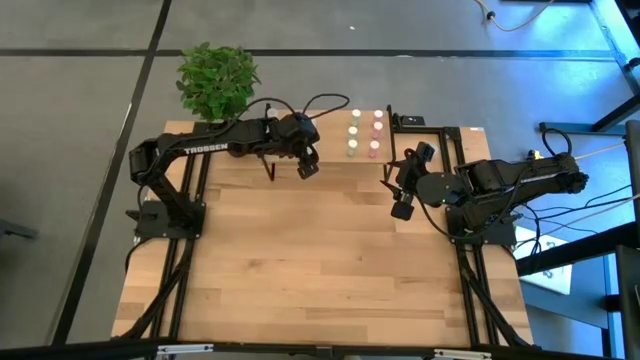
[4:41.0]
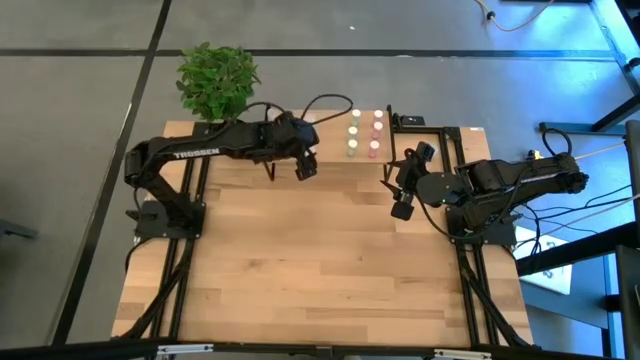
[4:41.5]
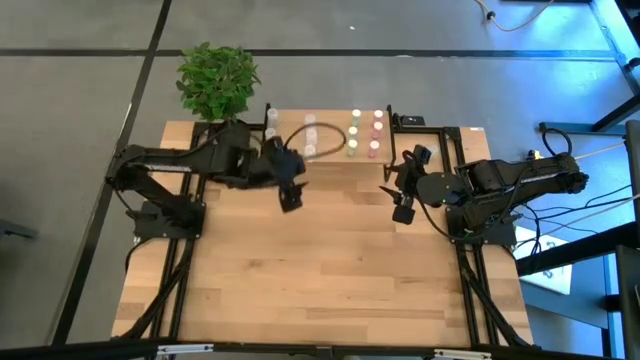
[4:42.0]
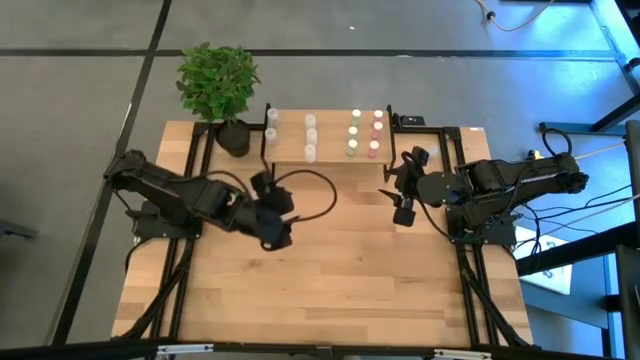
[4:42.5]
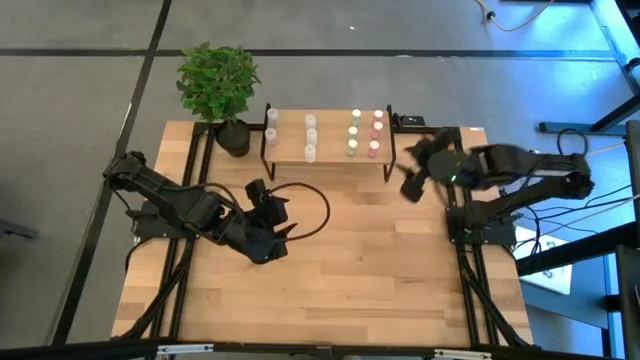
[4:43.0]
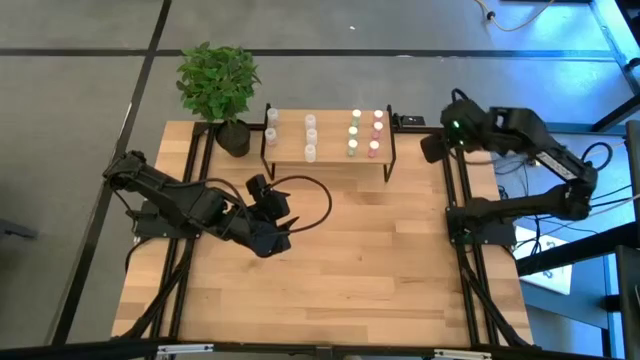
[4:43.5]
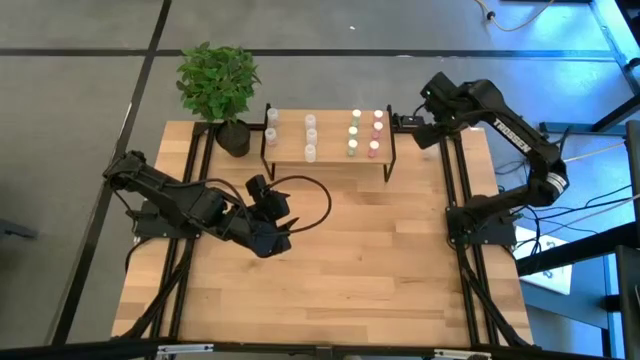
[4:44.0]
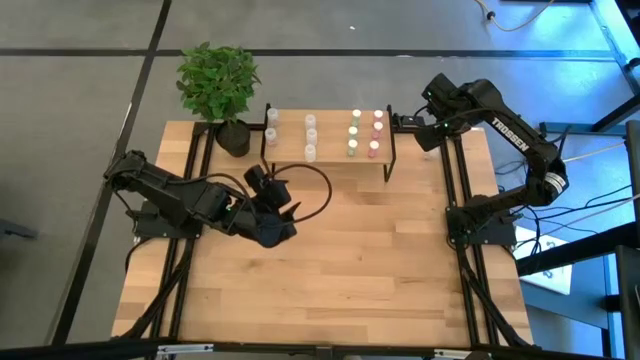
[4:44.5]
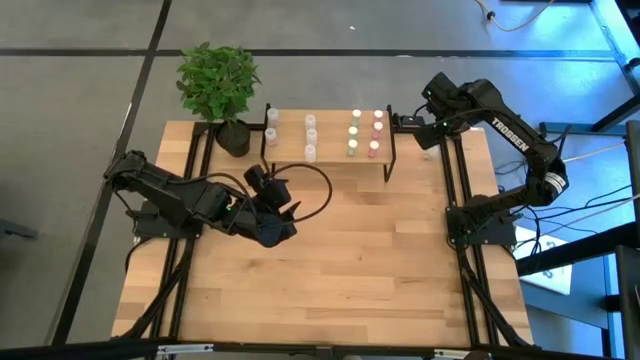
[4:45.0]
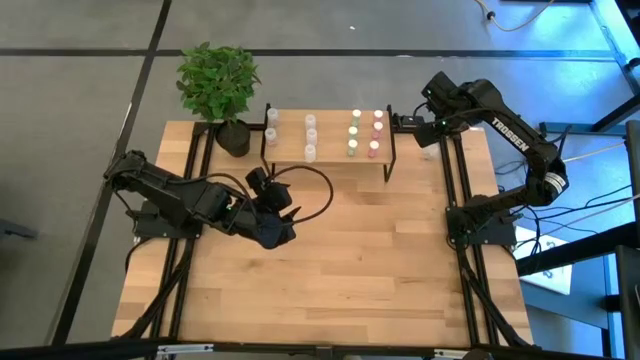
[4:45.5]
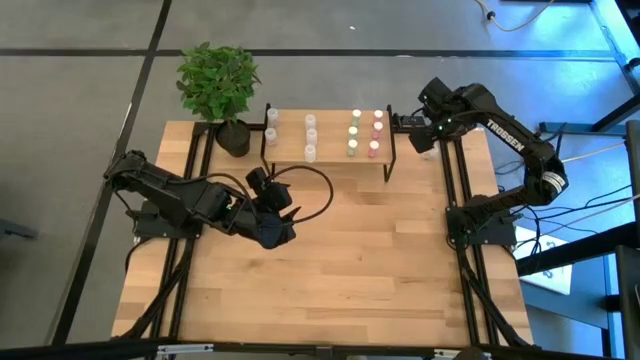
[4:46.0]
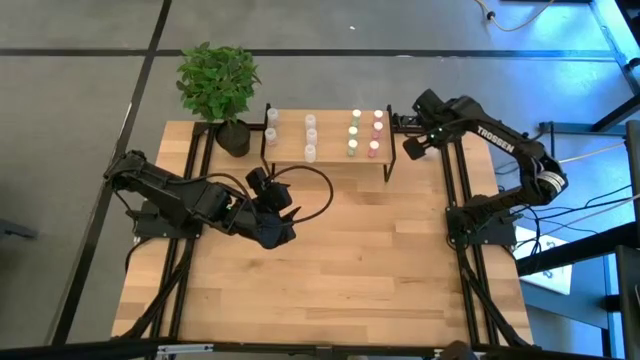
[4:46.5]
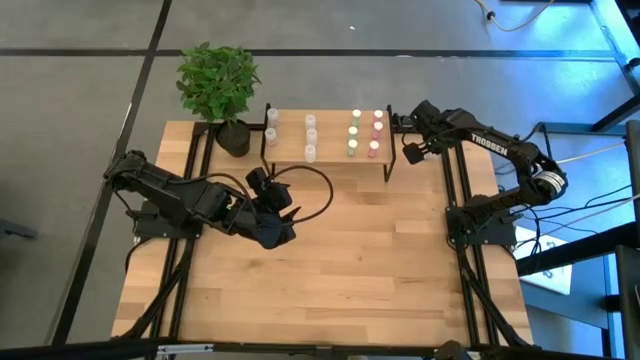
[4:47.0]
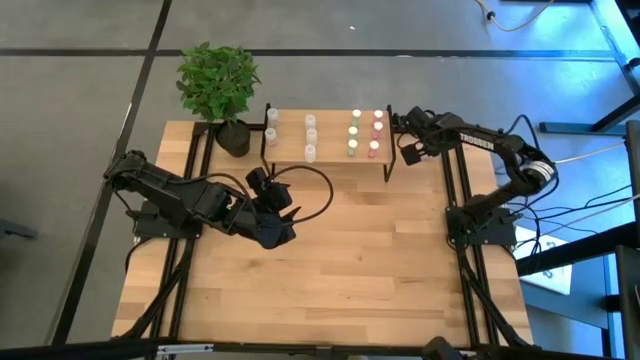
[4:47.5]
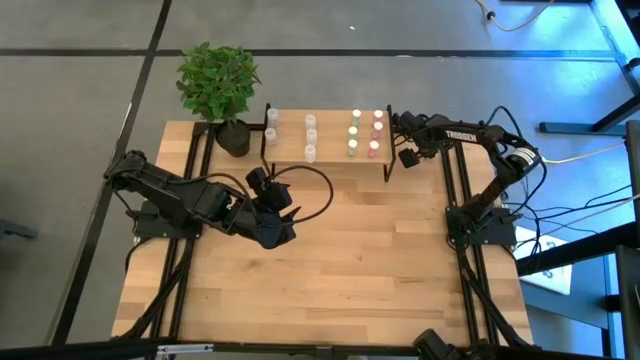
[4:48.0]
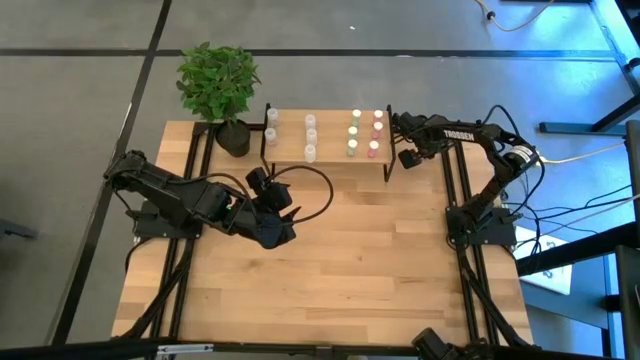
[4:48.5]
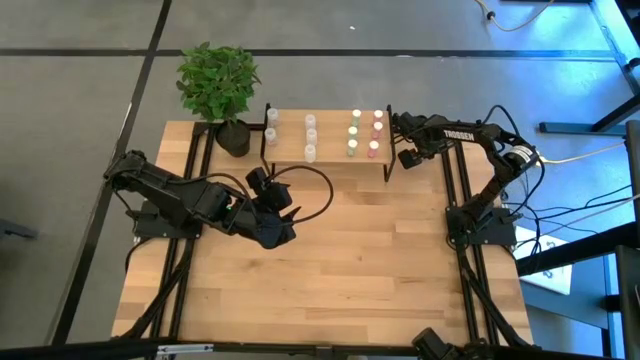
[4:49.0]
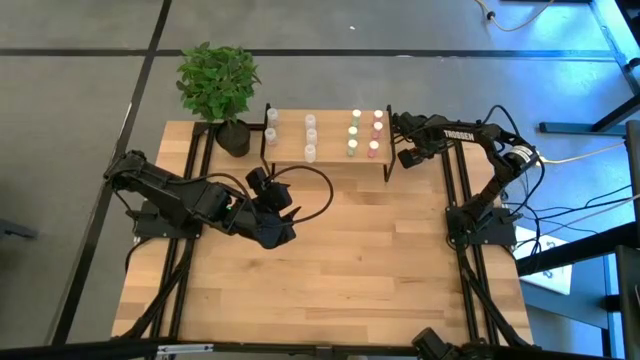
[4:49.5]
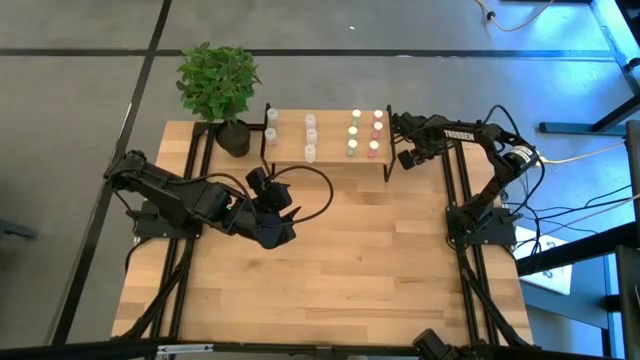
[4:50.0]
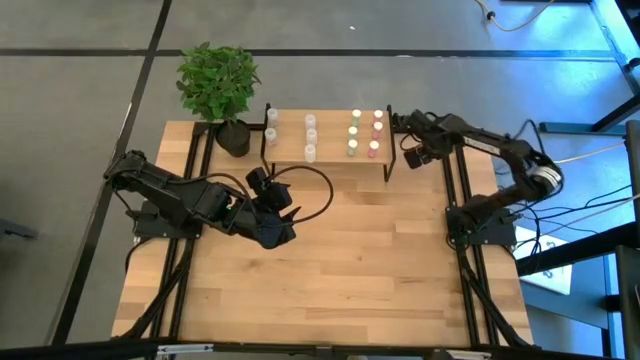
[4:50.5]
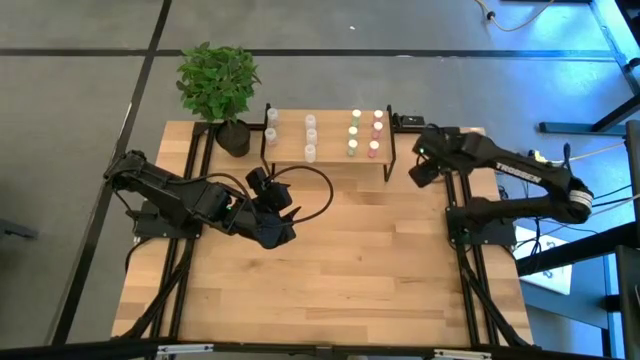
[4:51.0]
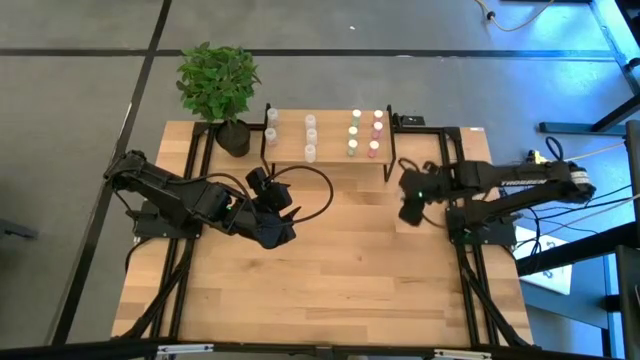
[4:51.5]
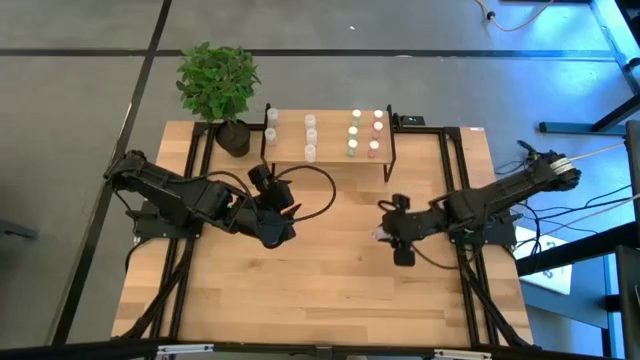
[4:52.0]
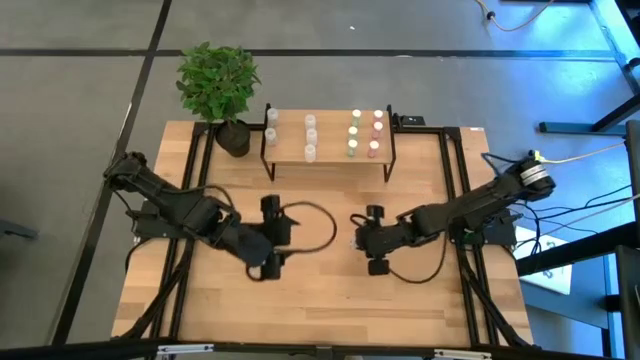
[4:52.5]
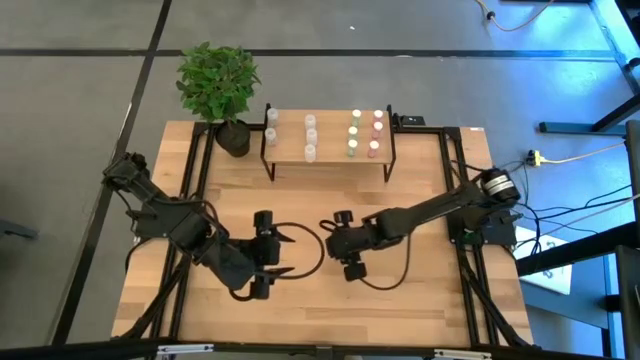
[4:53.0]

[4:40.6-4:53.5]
Task: Pick and place medicine bottles onto shelf by color
Put the transparent pill bottle on the shelf aligned with the other transparent pill bottles

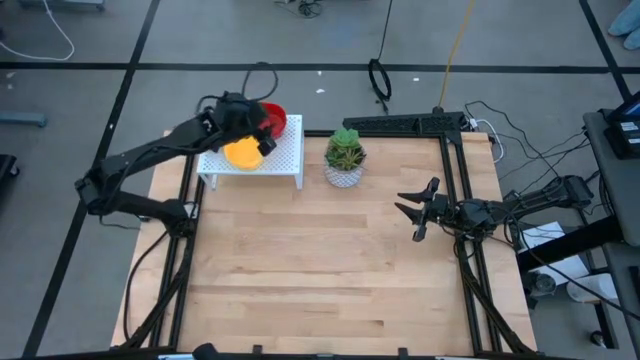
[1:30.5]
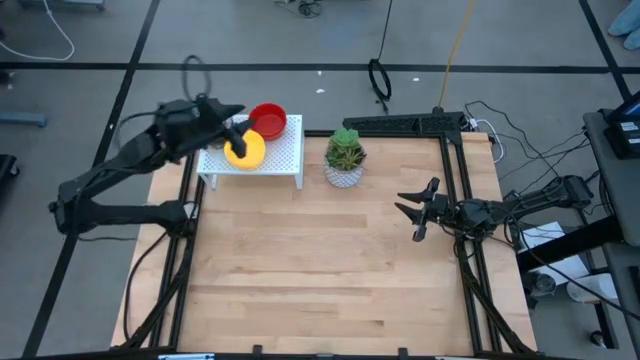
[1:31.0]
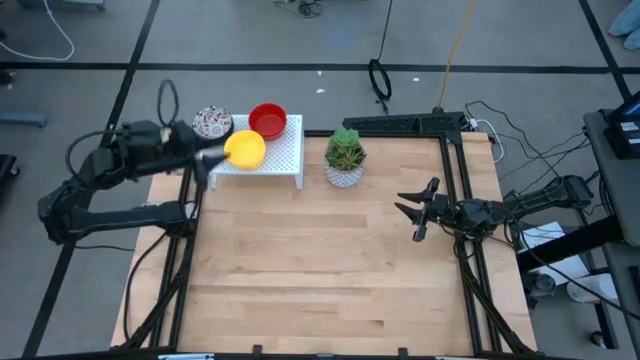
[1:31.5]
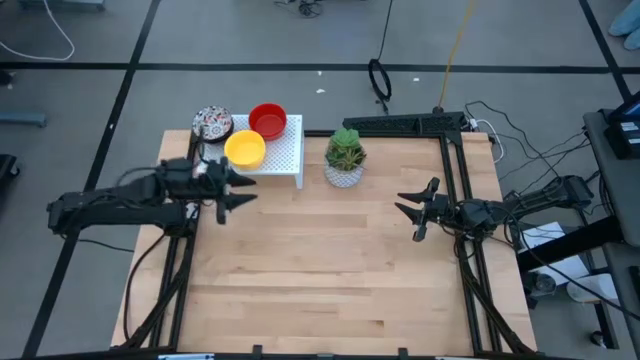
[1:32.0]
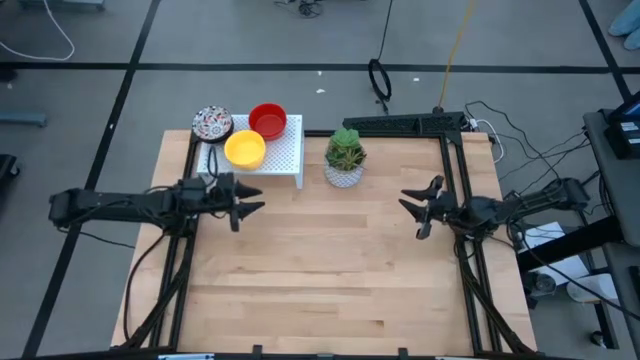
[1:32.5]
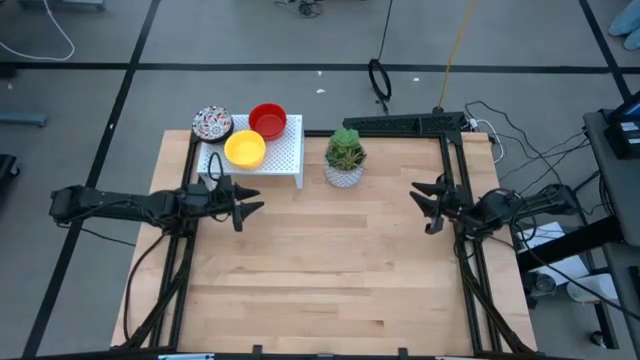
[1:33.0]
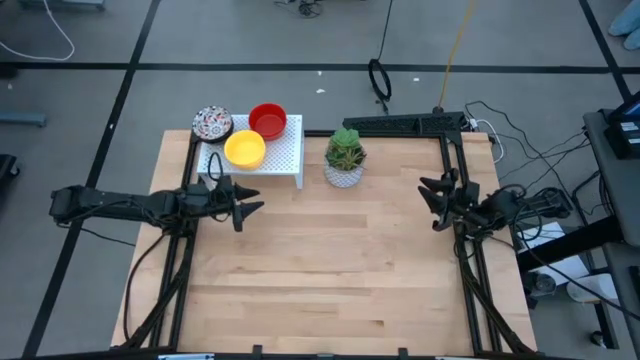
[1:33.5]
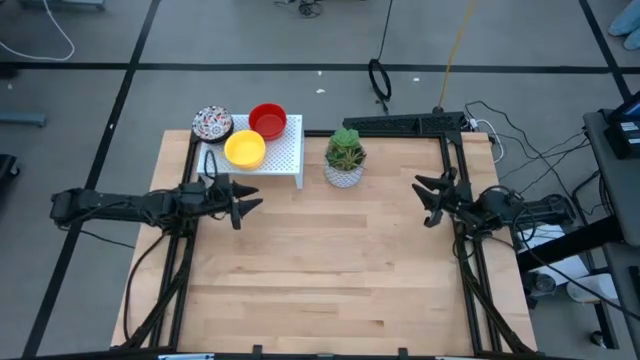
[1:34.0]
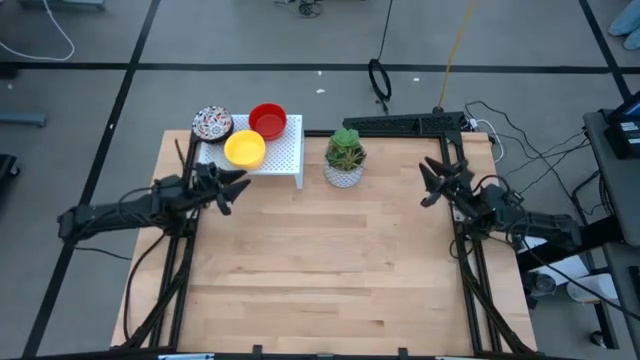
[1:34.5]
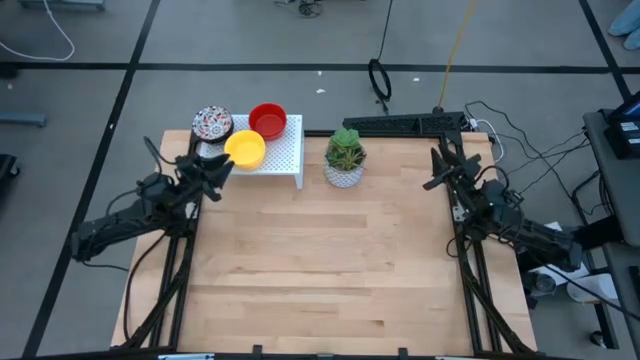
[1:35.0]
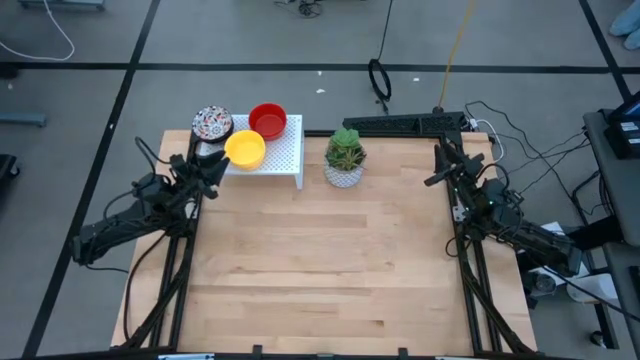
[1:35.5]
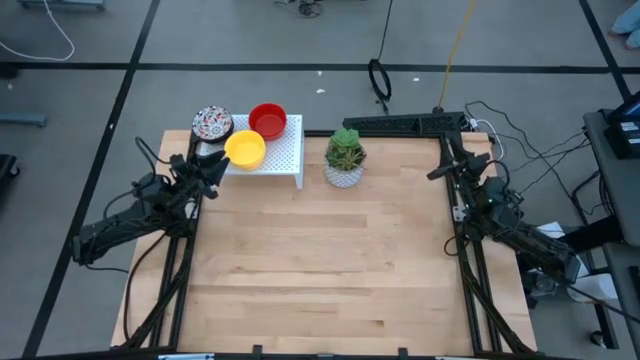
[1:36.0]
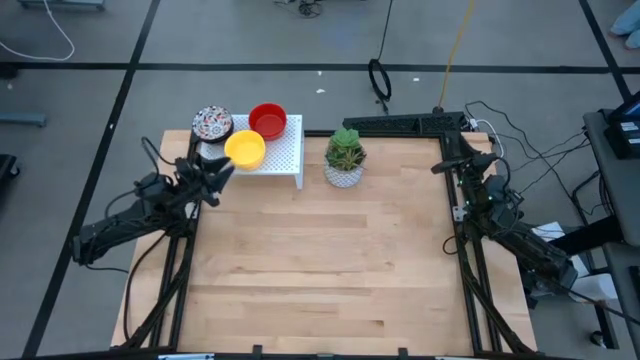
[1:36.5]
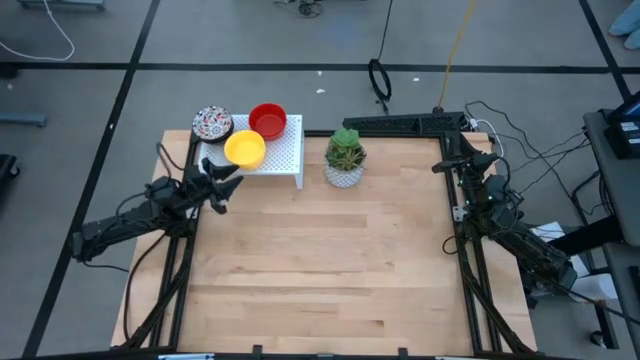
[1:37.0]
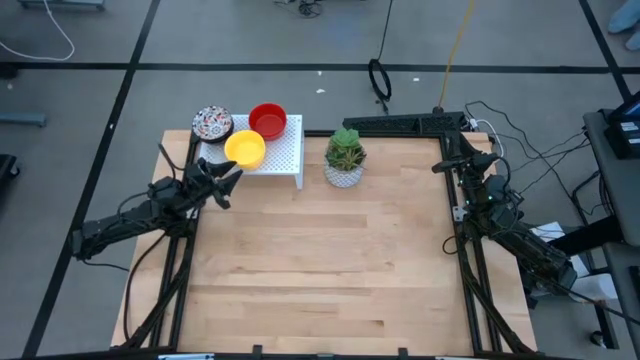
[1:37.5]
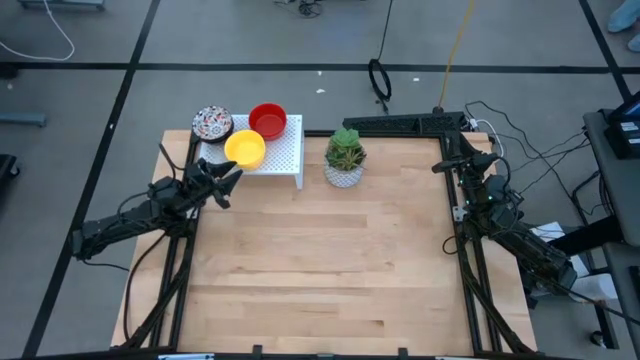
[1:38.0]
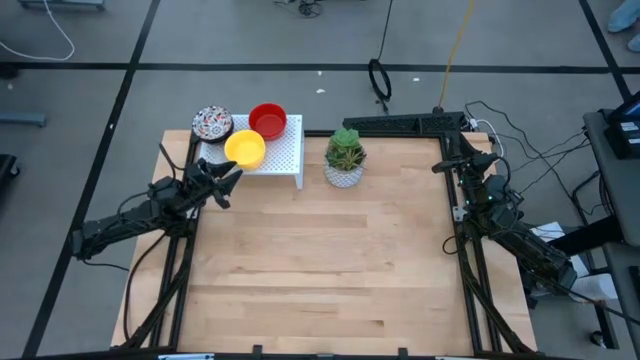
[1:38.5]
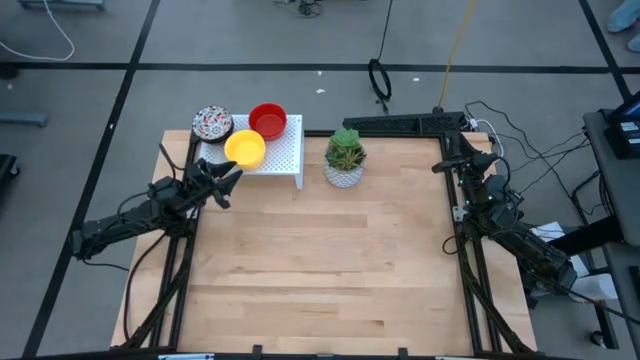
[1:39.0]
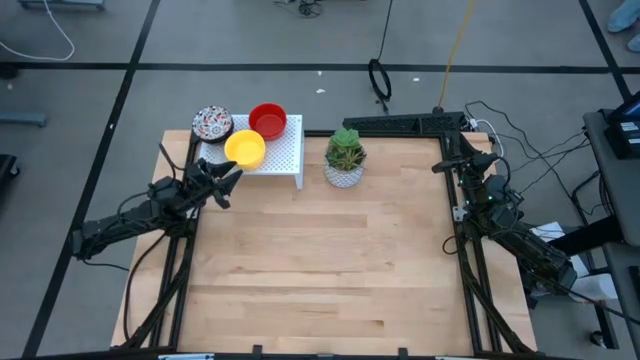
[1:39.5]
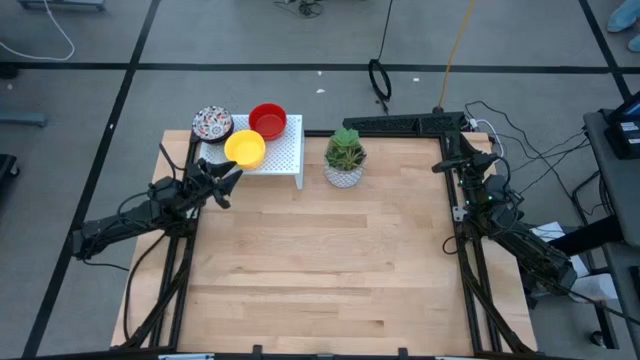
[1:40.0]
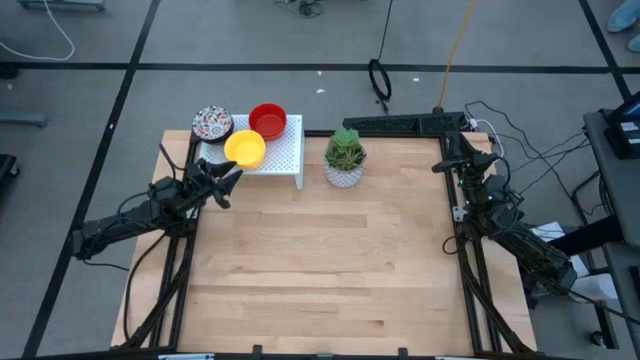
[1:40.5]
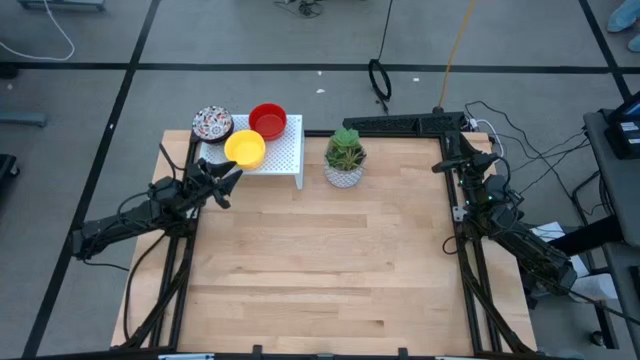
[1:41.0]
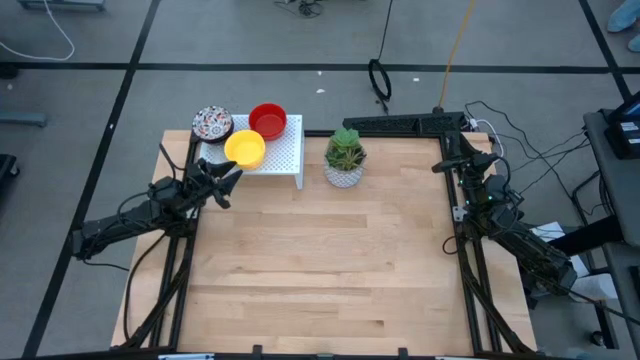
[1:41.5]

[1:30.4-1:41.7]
Task: Pick & Place Mini bowls
Return to Home Position
